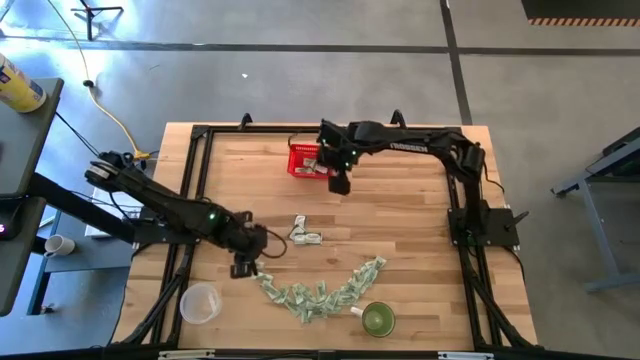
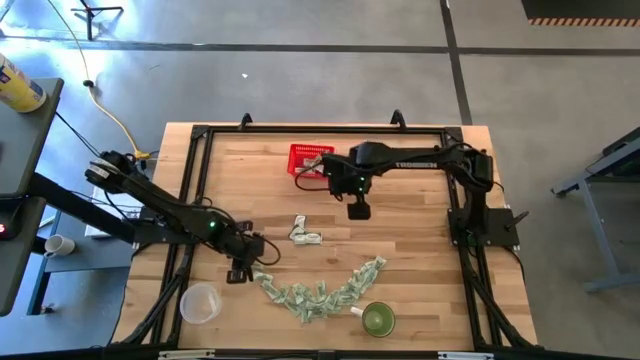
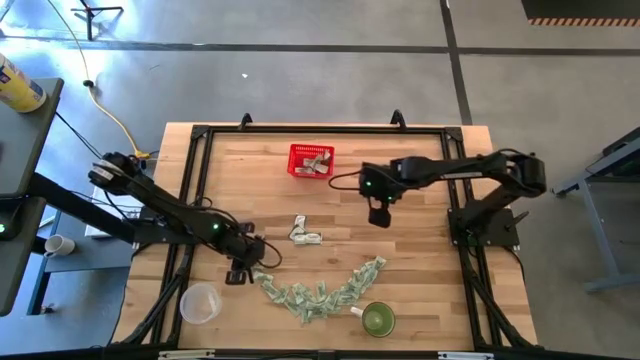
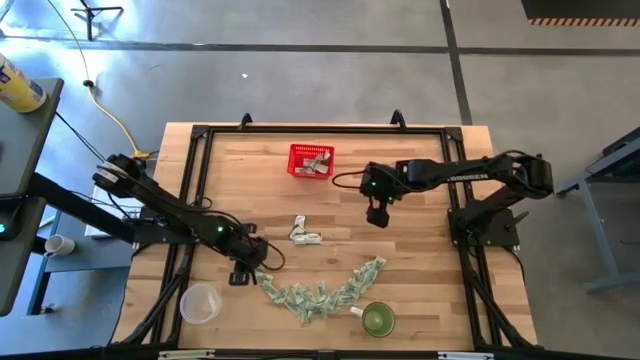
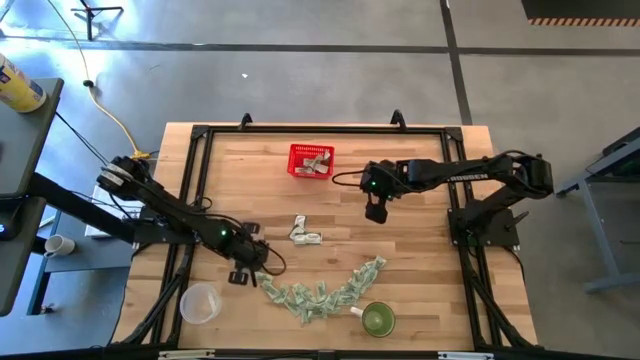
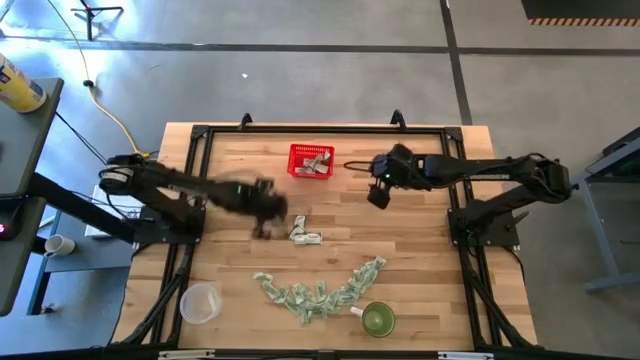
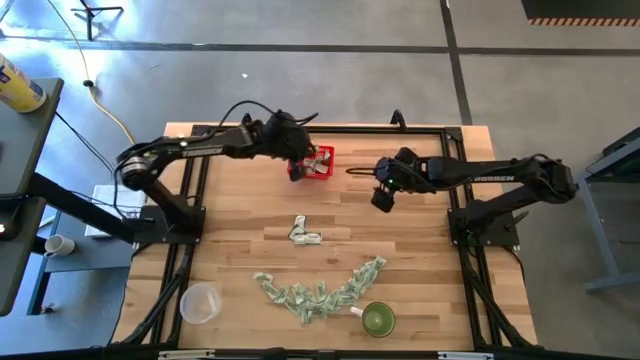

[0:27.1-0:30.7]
Task: Pick and place items into bin
Put the light green stevia packet into the red bin

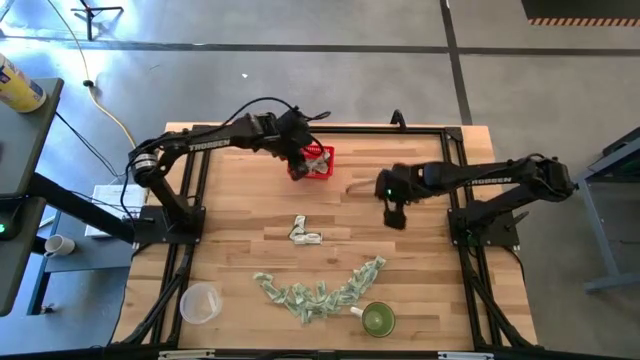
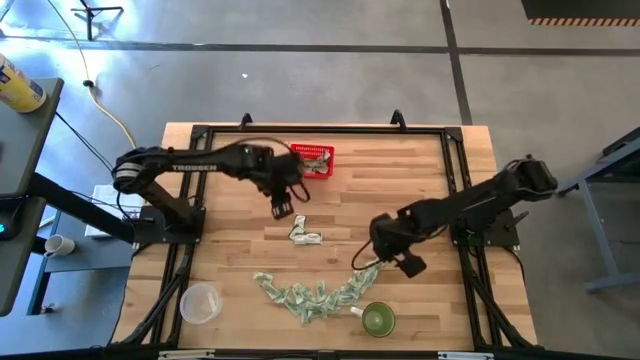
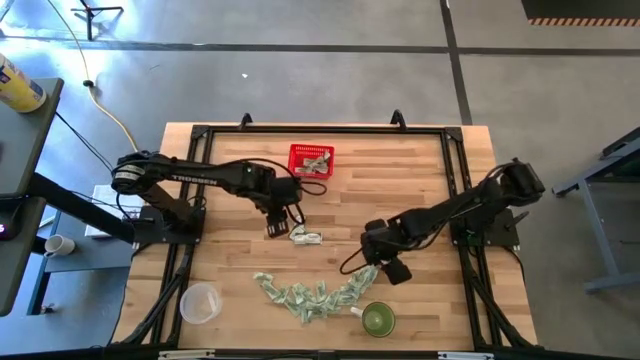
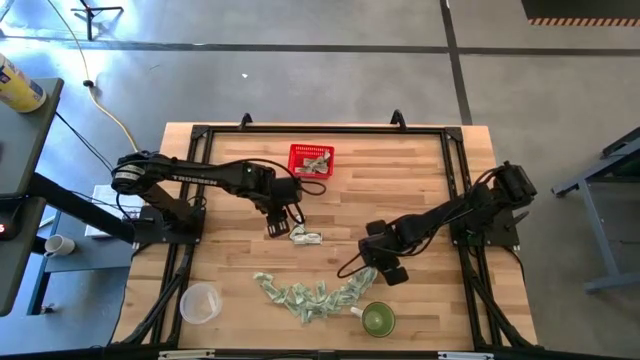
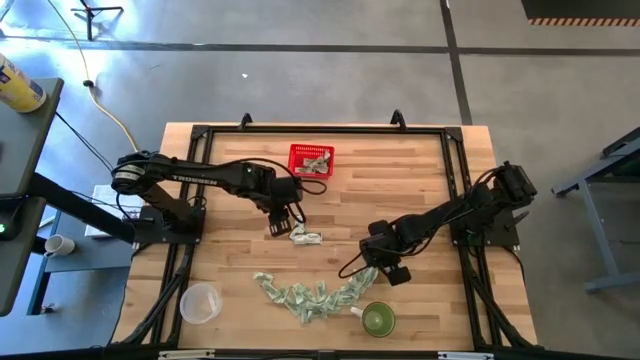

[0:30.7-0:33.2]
Put the light green stevia packet into the red bin

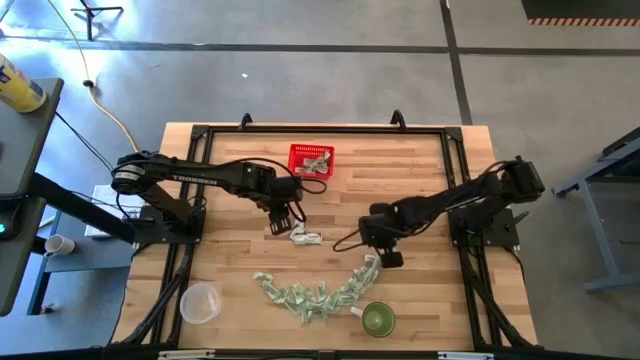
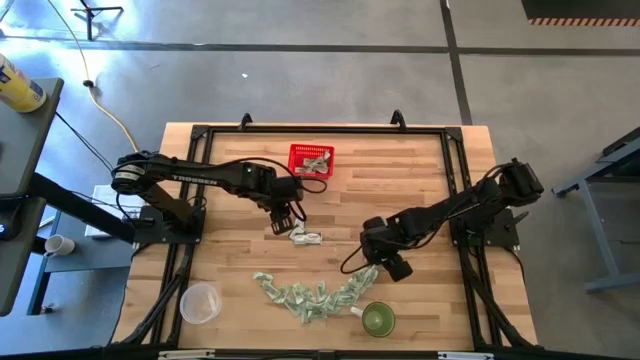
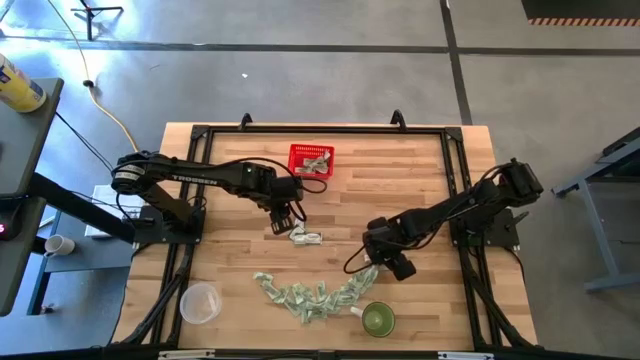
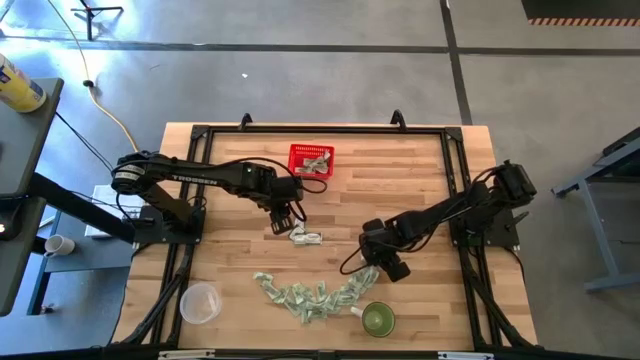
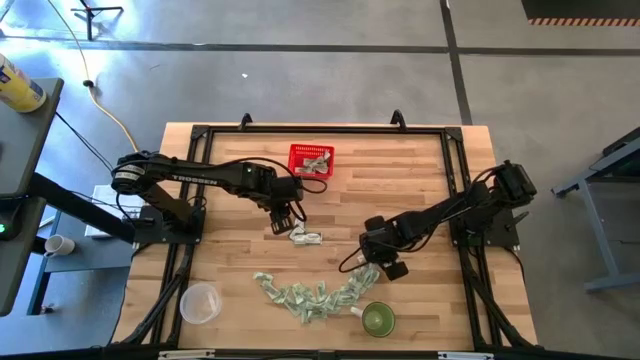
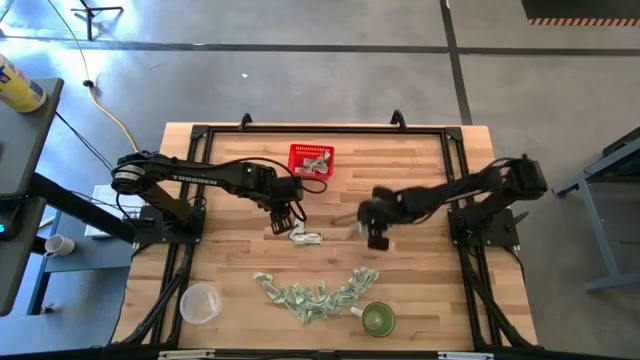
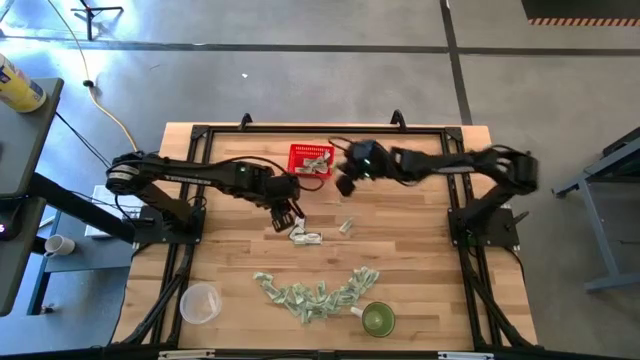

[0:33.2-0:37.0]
Put the light green stevia packet into the red bin

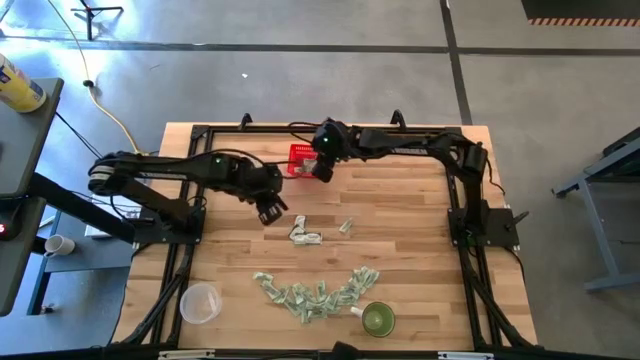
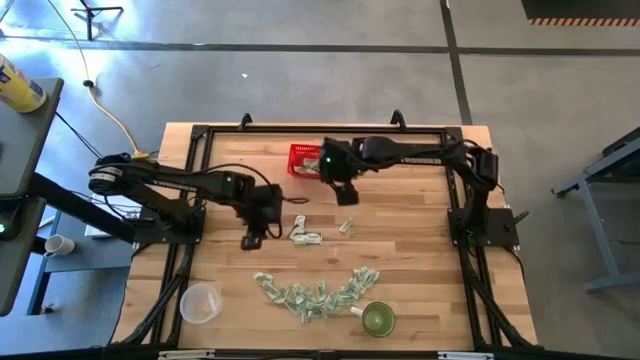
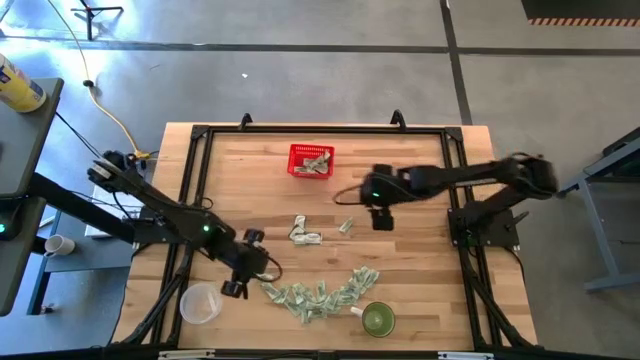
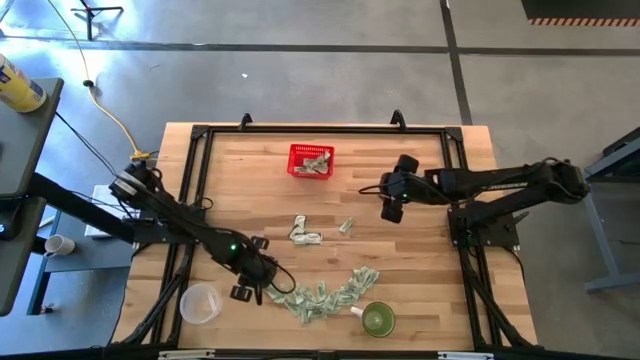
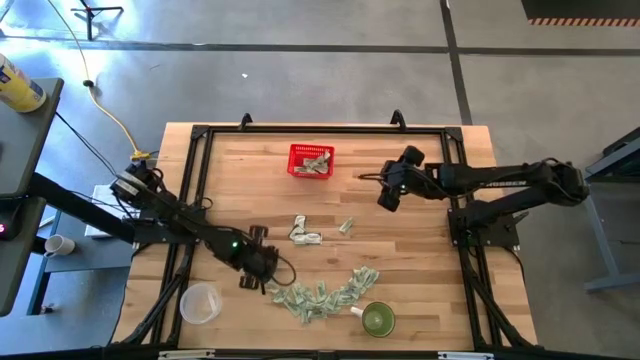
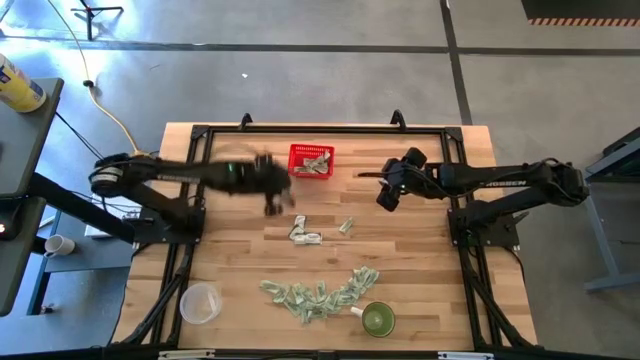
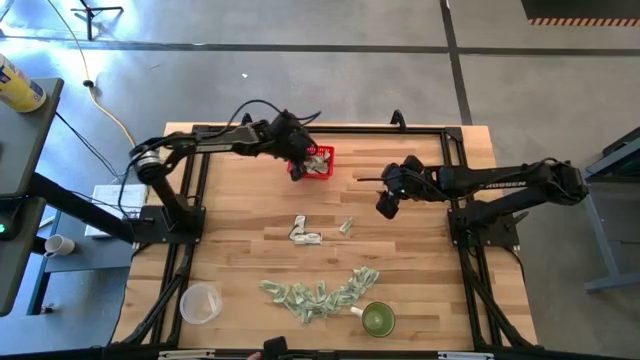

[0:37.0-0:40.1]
Put the light green stevia packet into the red bin

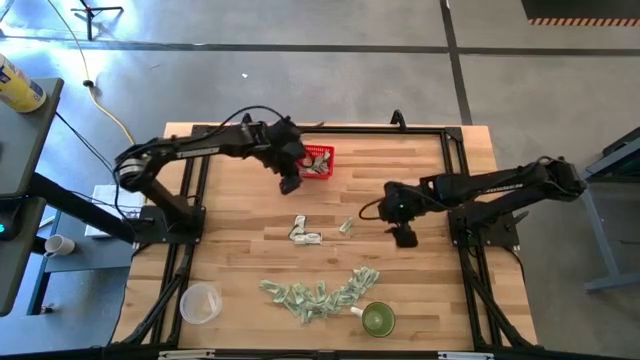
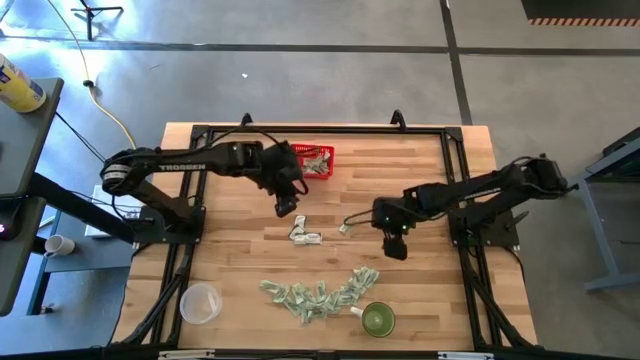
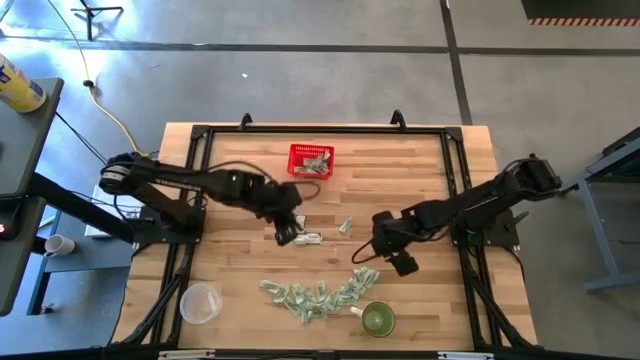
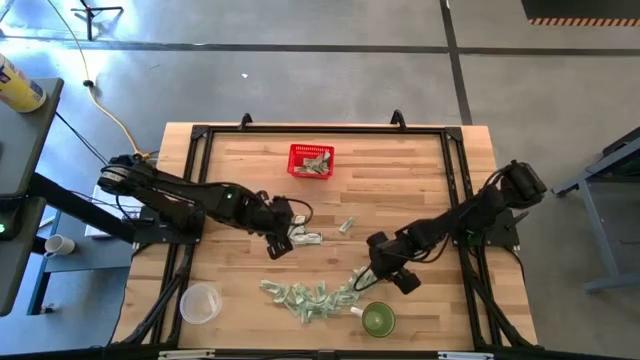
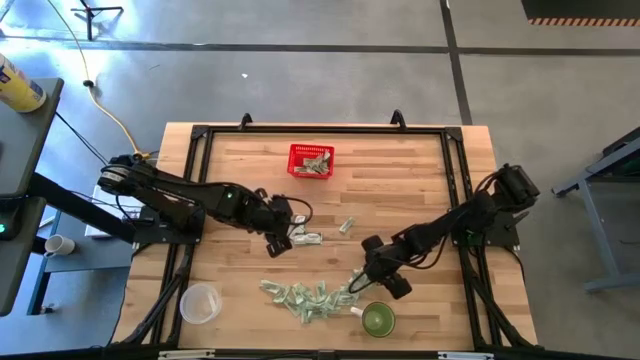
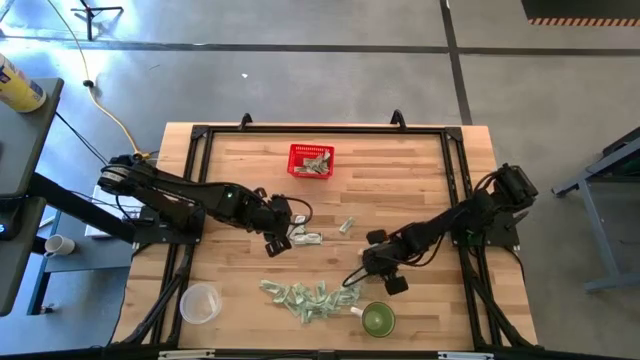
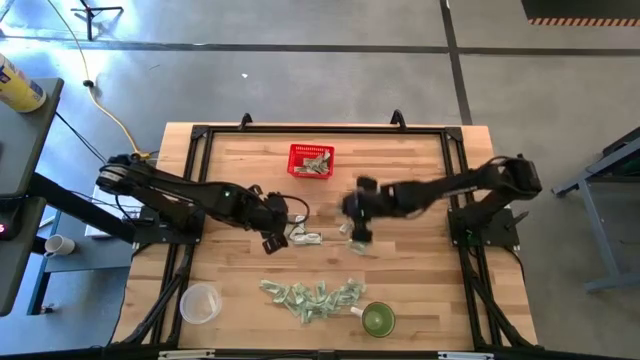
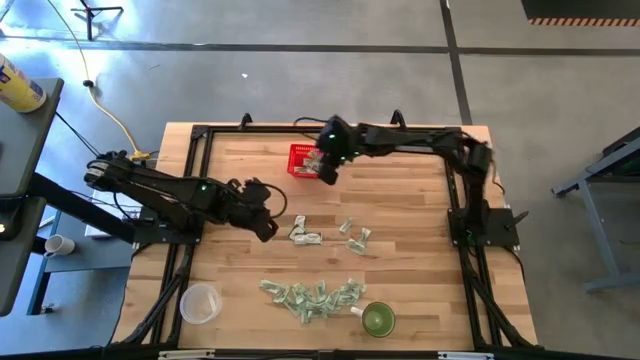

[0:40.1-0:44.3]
Put the light green stevia packet into the red bin

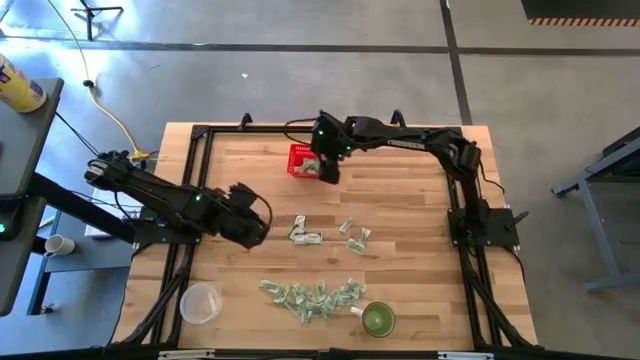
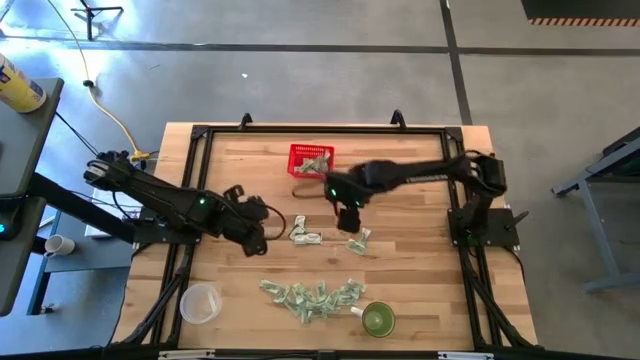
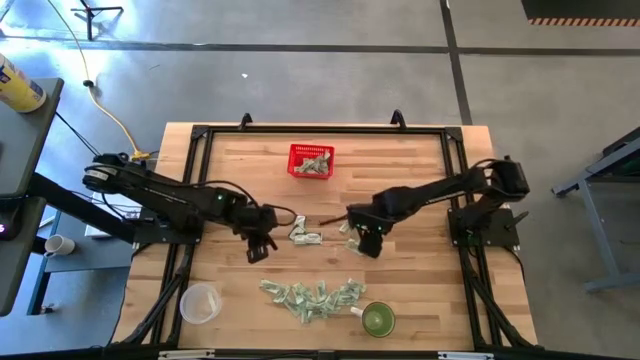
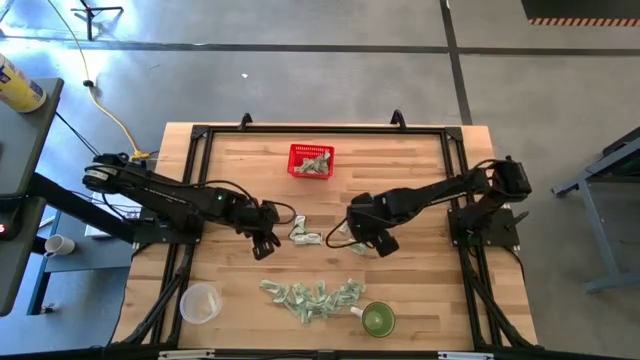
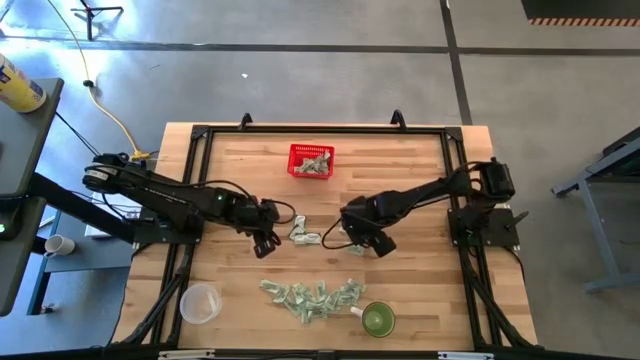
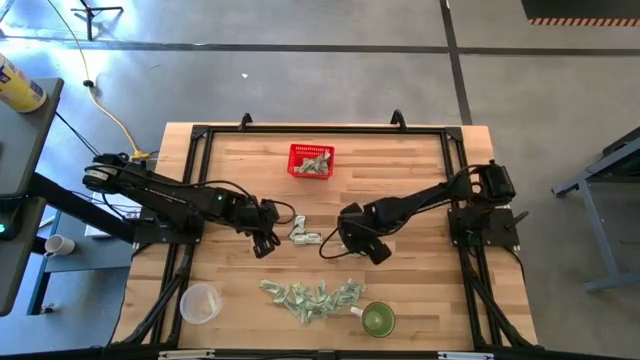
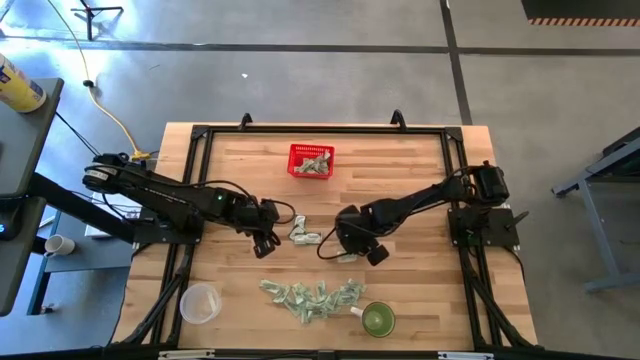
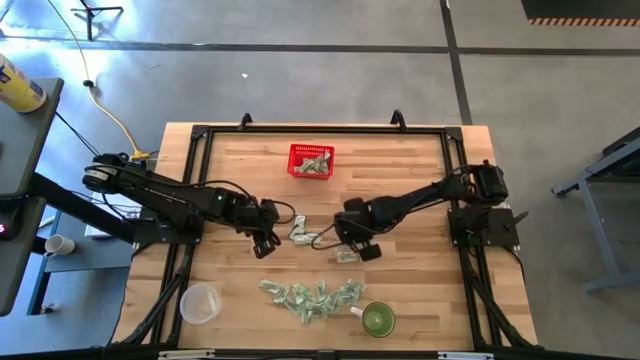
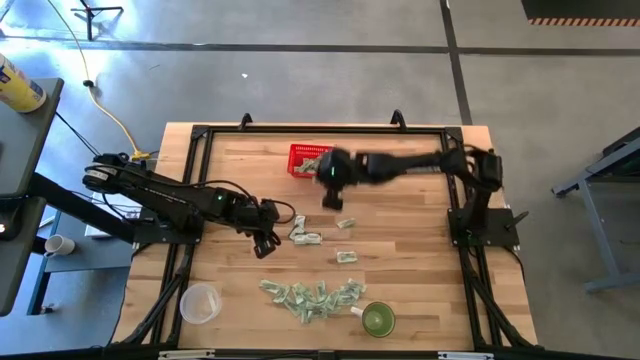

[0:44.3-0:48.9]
Put the light green stevia packet into the red bin

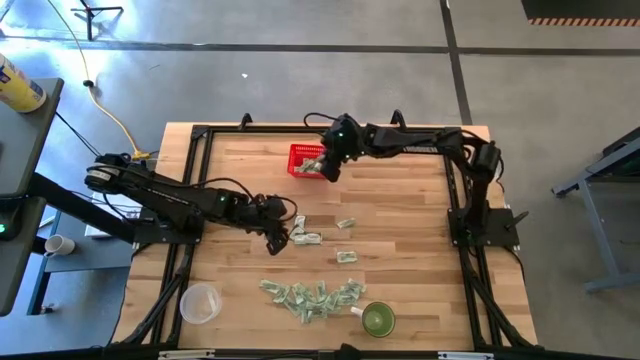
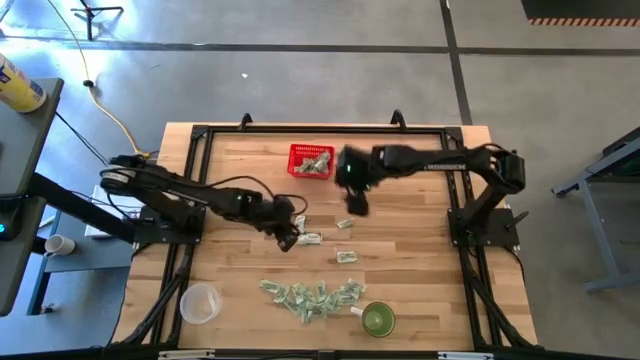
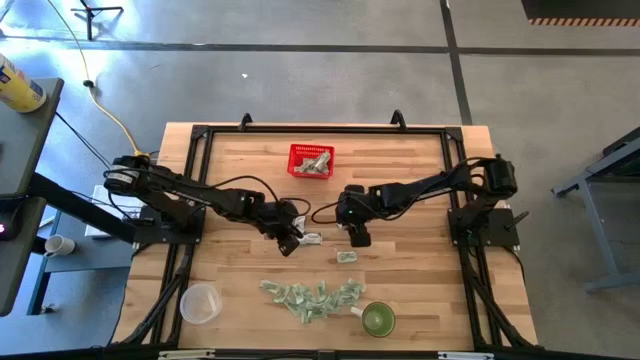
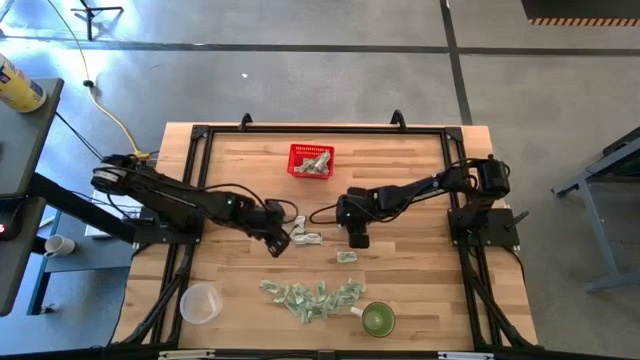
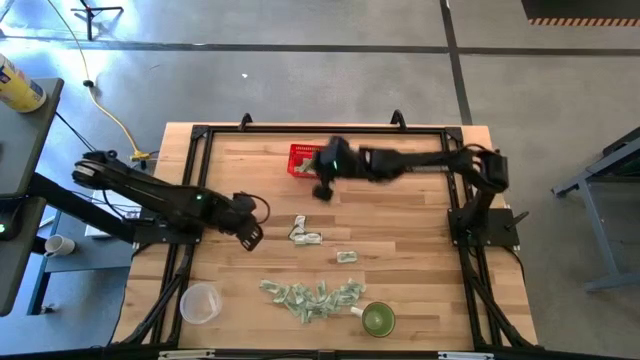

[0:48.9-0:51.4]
Put the light green stevia packet into the red bin
